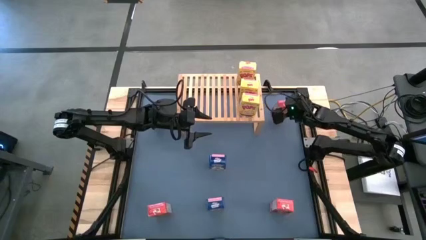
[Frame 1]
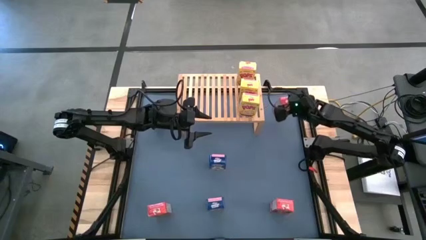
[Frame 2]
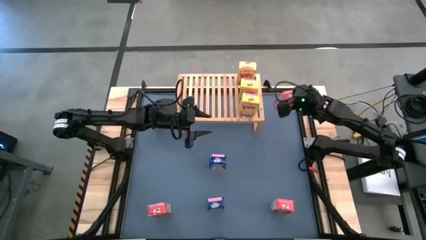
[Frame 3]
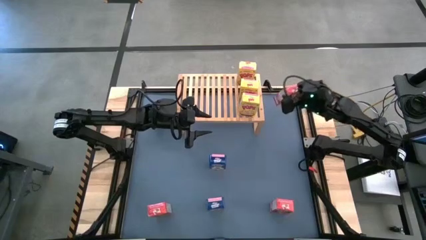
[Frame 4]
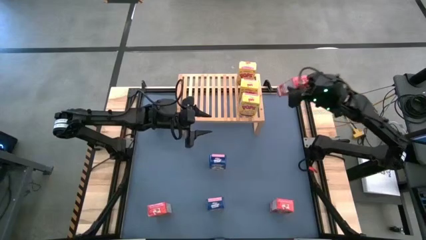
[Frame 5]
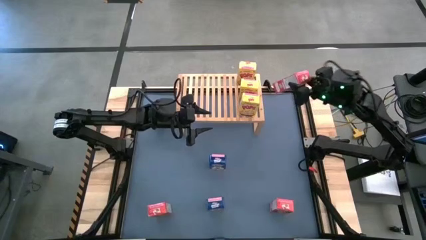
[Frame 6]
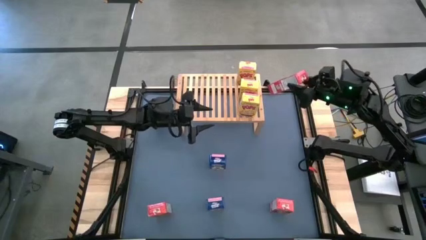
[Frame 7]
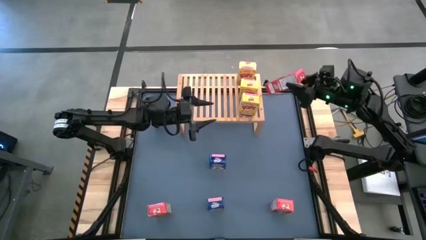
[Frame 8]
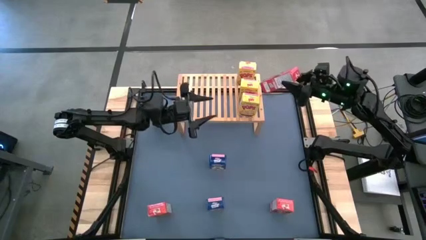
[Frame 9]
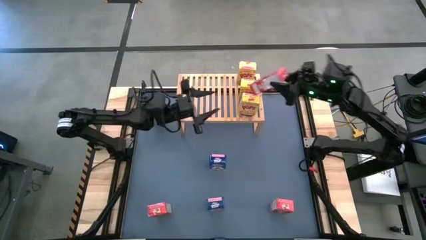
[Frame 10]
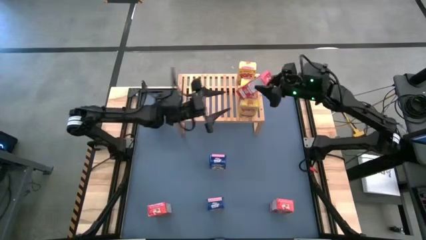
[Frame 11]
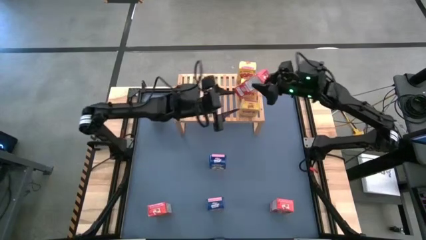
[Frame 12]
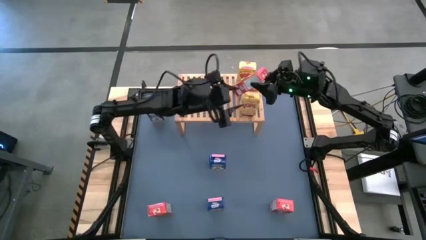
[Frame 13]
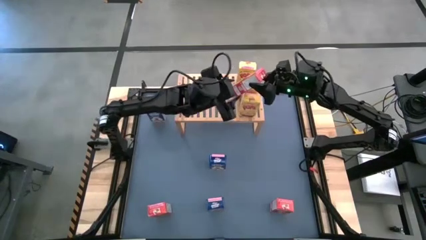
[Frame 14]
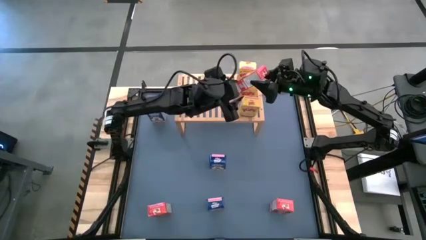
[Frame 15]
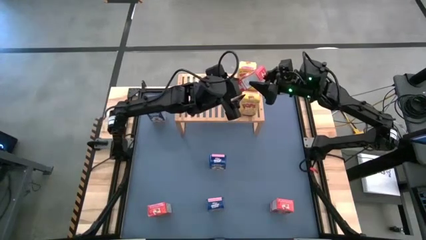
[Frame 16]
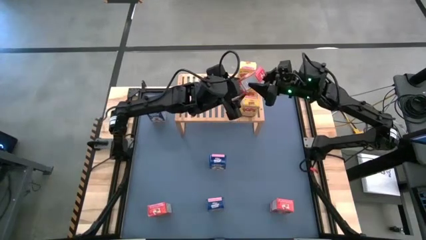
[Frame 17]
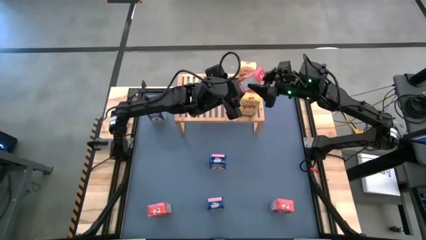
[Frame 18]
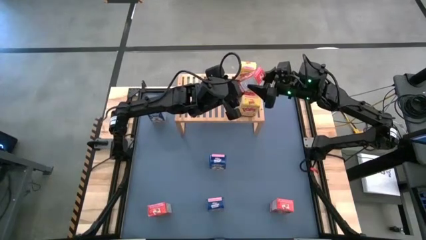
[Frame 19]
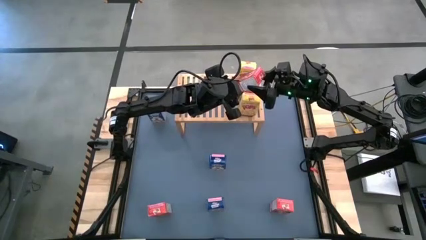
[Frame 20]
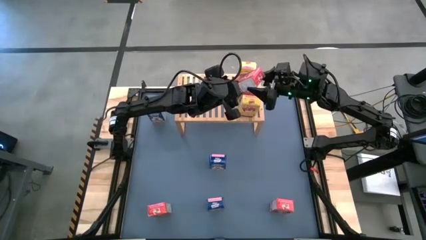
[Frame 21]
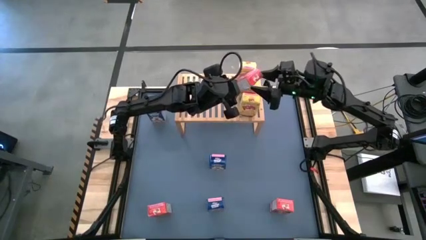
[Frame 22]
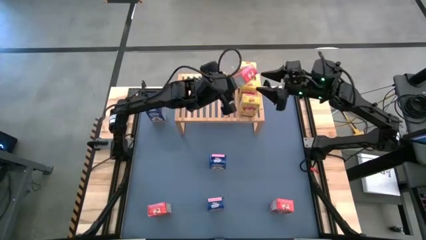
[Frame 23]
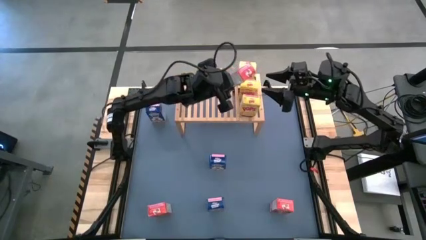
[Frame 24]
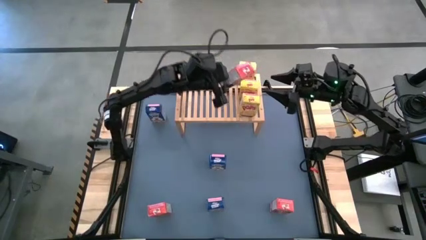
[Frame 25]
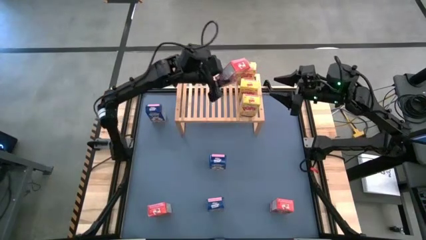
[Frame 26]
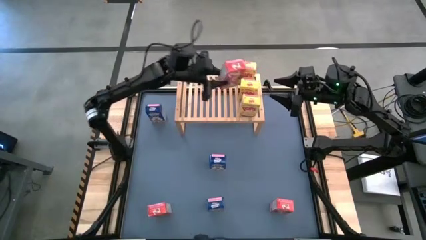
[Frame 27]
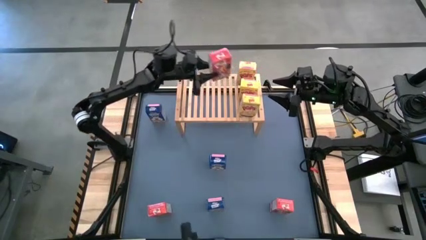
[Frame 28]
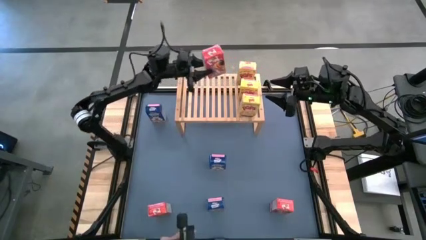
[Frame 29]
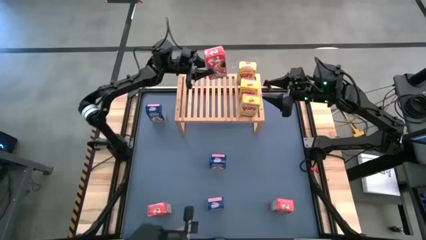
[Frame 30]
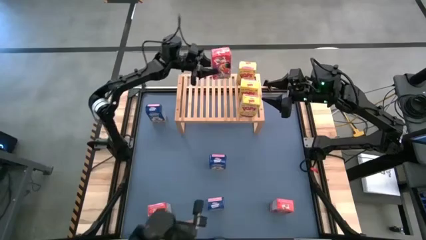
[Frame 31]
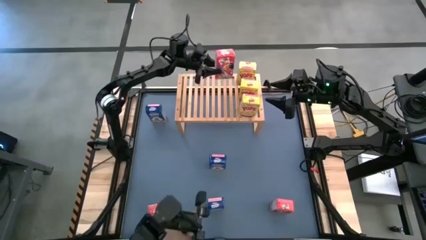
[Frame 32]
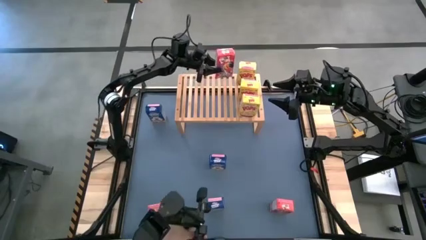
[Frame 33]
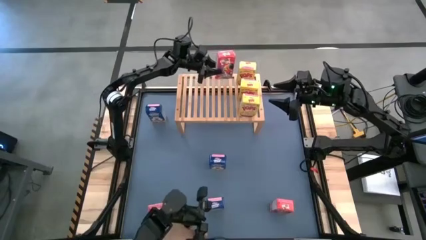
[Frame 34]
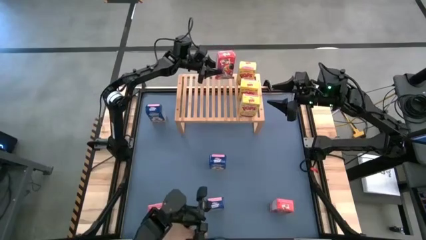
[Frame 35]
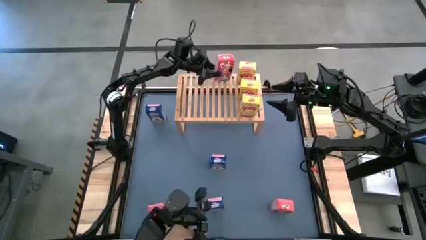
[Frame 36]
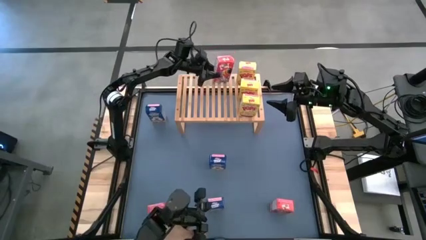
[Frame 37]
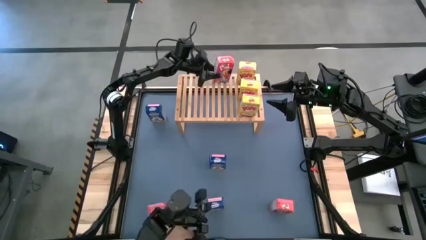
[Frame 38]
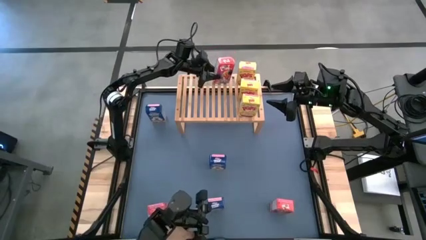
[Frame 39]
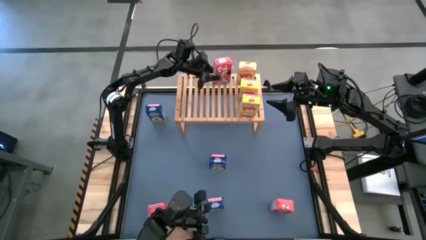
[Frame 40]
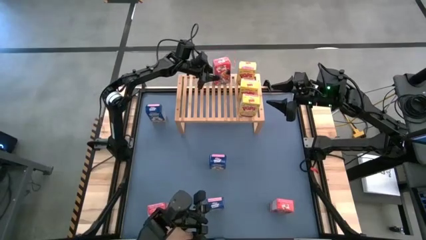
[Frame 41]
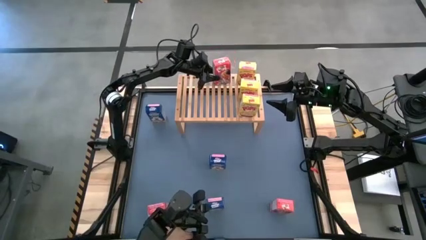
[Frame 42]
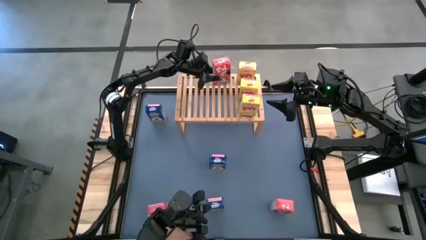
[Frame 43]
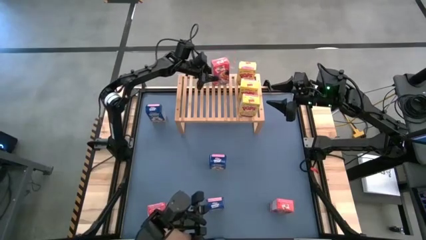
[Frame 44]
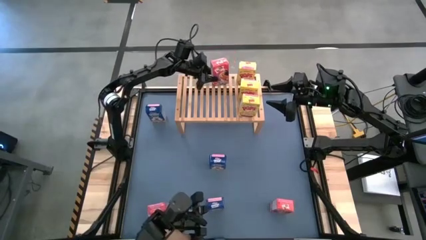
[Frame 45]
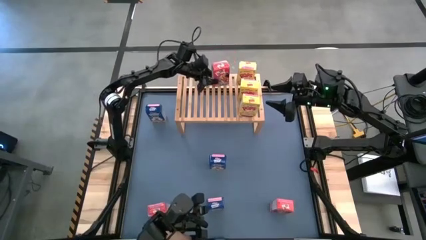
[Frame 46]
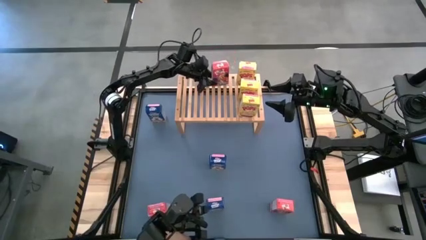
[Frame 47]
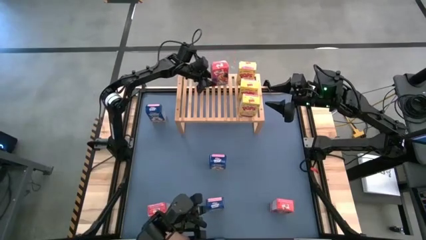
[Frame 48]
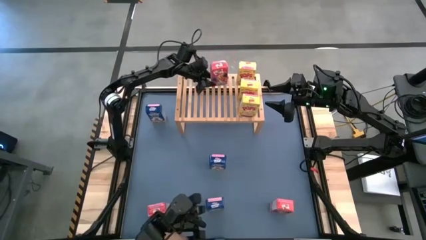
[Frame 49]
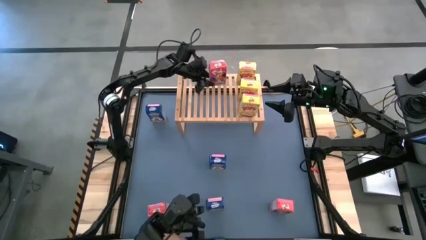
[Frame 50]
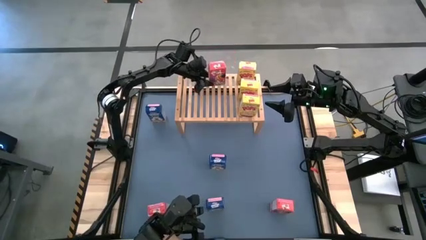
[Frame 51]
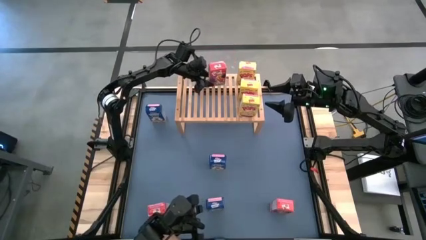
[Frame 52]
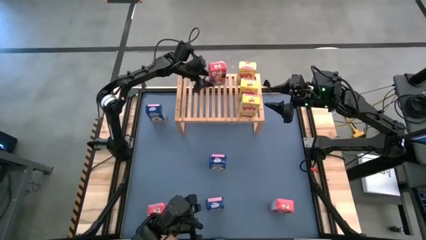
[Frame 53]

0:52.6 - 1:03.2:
Task: Stack cereal on shelf
Put the top red cereal box on the shelf

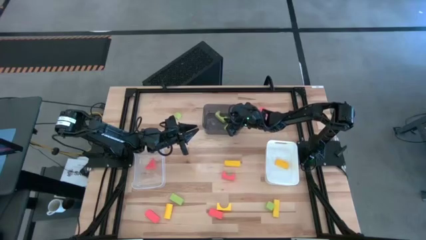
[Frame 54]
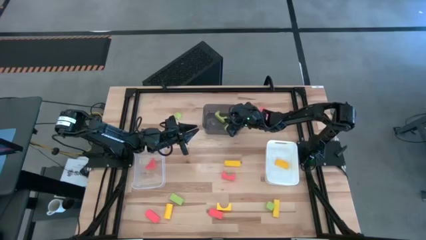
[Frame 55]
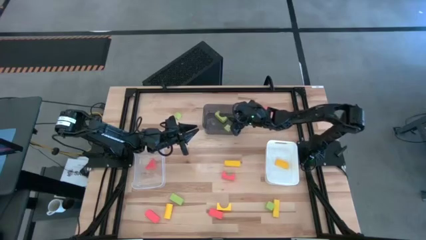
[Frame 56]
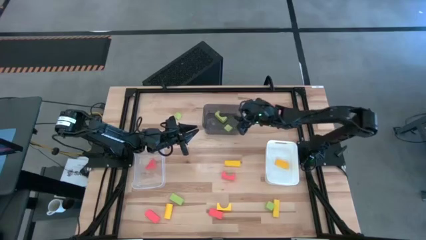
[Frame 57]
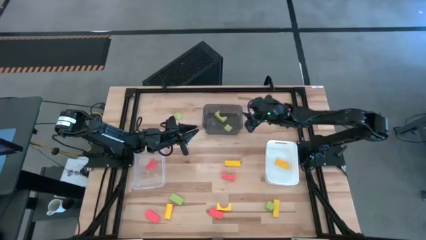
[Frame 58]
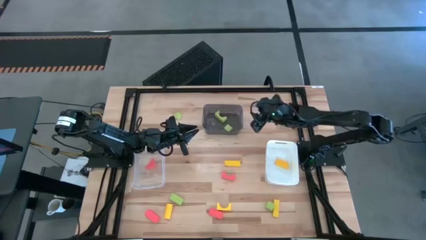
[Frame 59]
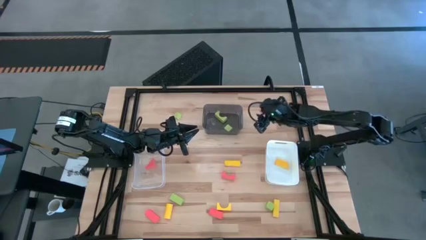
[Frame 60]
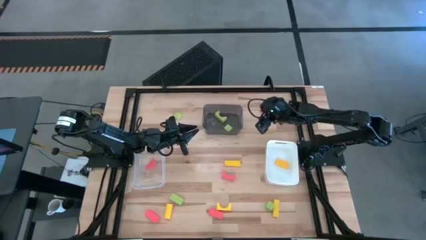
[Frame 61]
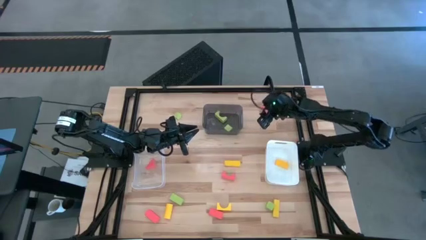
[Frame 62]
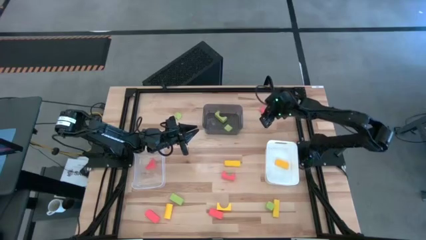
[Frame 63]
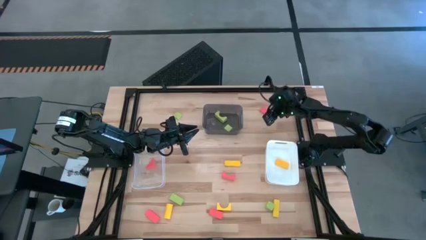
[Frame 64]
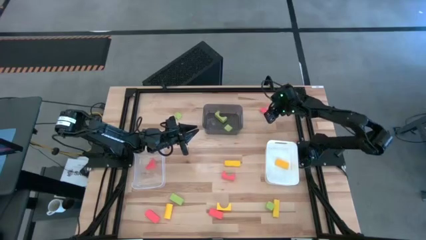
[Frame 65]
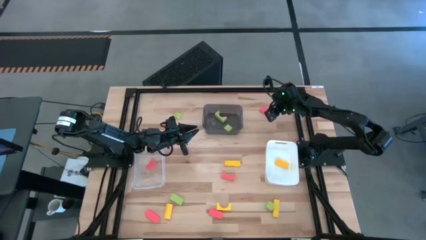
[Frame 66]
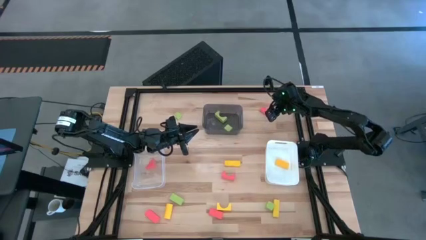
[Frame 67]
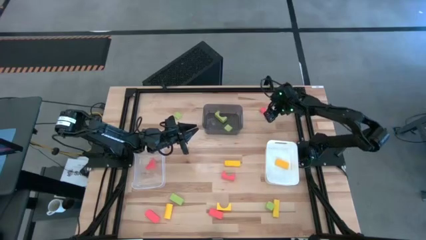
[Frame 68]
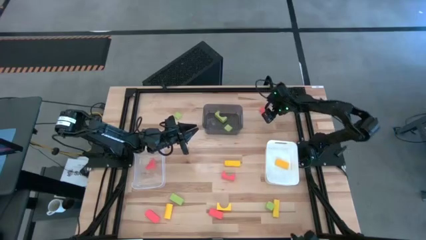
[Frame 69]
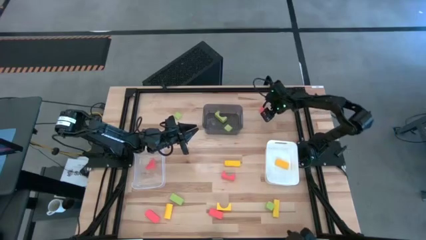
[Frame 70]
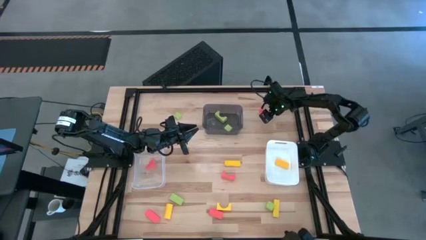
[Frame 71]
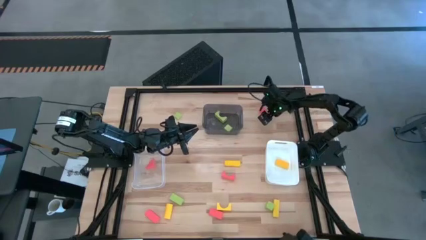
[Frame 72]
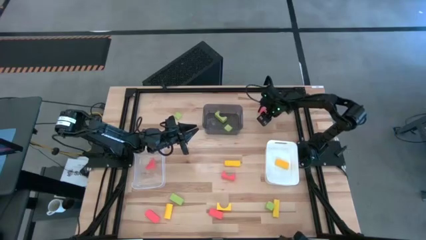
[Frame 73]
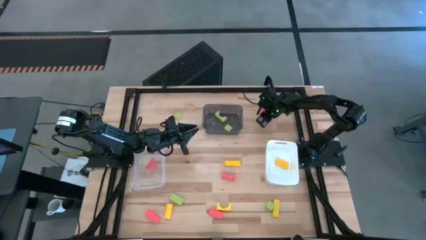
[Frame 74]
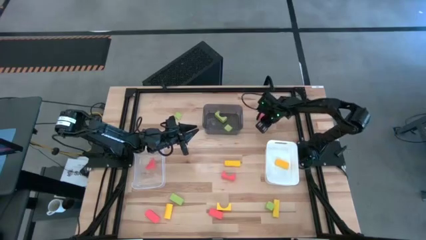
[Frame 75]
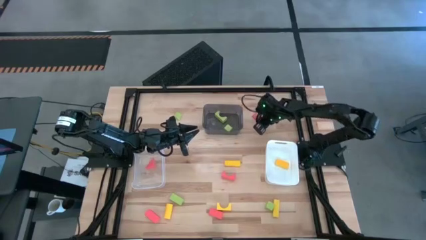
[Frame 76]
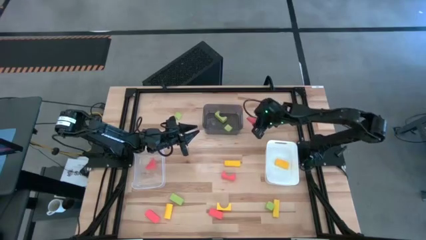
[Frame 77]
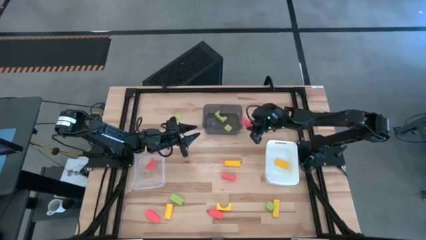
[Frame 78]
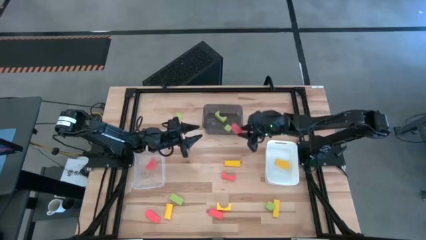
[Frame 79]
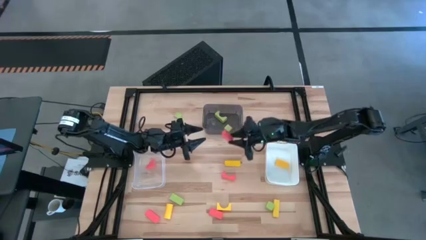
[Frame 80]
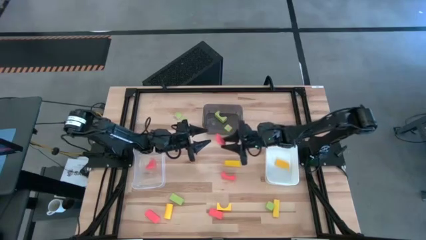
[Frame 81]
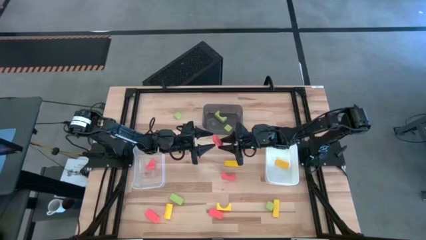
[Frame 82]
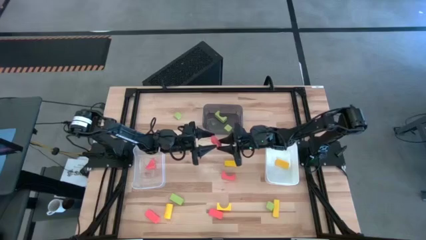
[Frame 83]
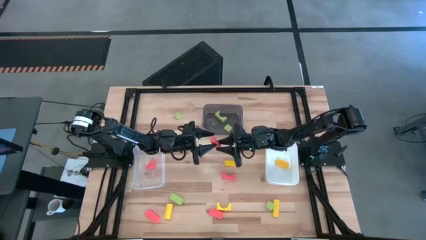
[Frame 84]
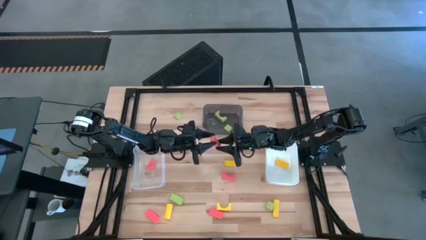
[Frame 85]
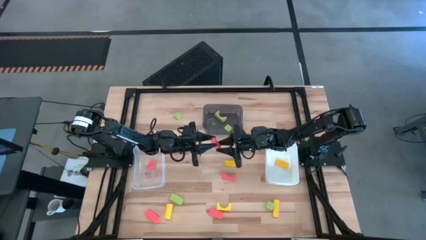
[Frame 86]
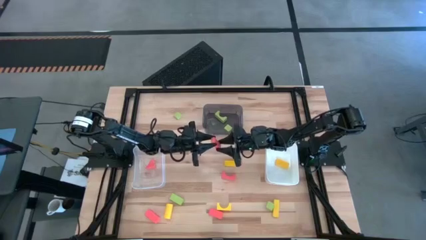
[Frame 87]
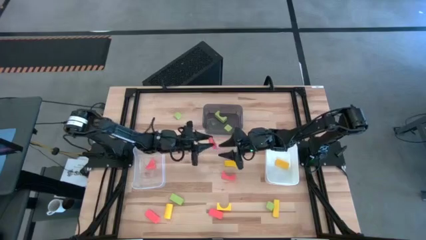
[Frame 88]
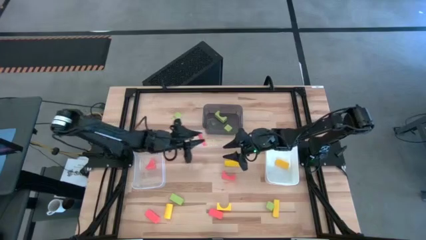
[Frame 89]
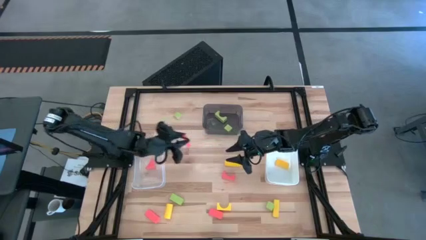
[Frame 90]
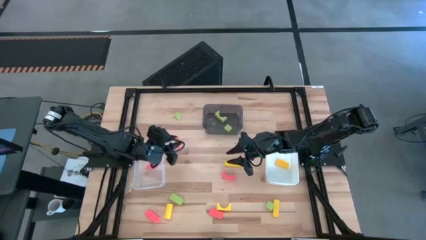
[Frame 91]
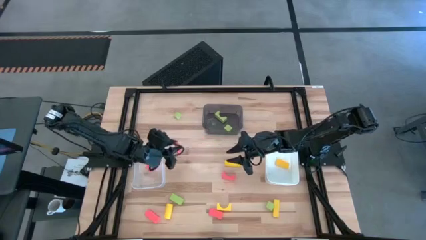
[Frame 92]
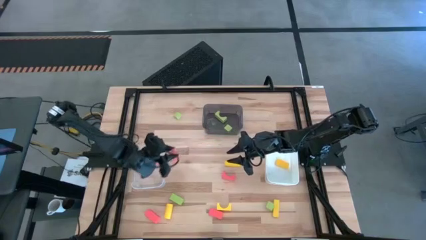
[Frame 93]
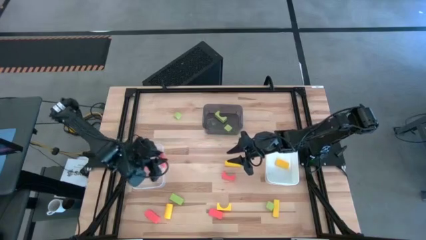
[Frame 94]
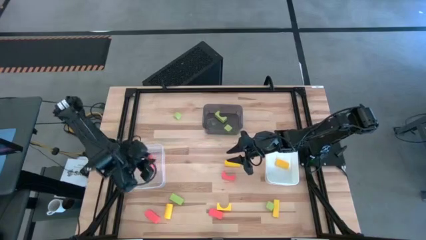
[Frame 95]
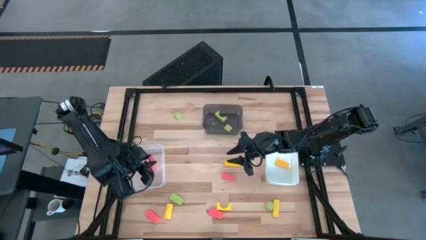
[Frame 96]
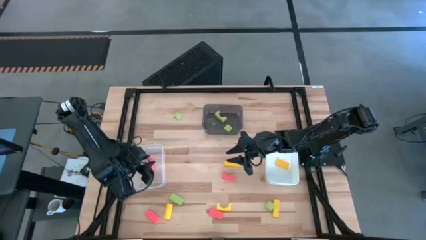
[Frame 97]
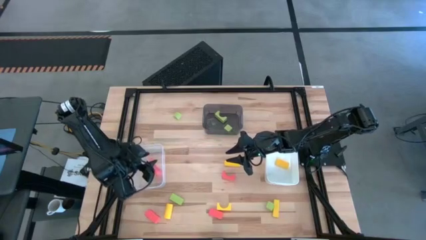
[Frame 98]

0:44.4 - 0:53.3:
Task: Sort & place blocks by color
Put the orange block into the transparent bin
